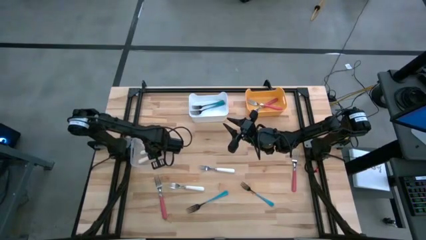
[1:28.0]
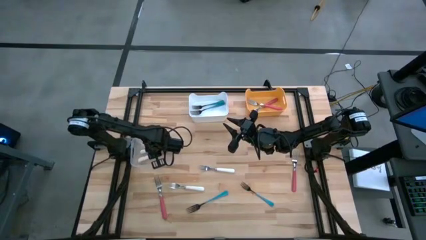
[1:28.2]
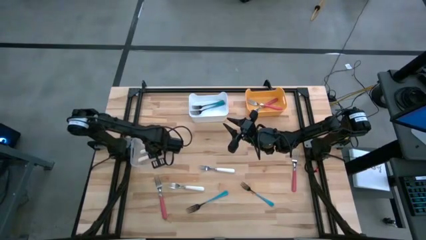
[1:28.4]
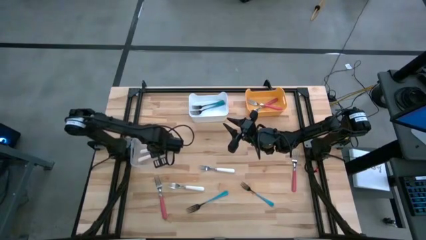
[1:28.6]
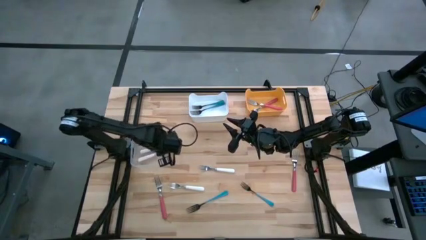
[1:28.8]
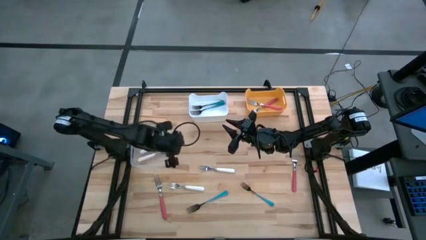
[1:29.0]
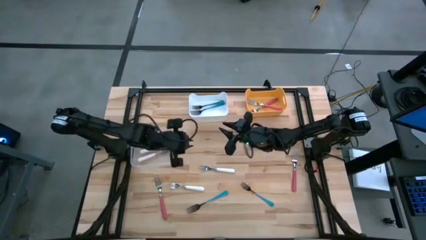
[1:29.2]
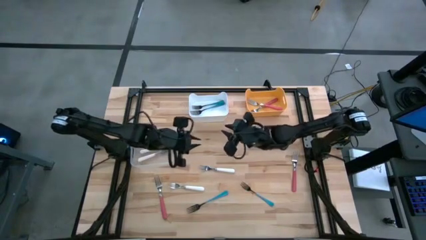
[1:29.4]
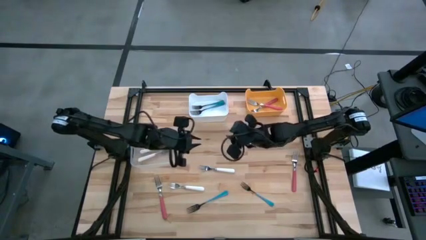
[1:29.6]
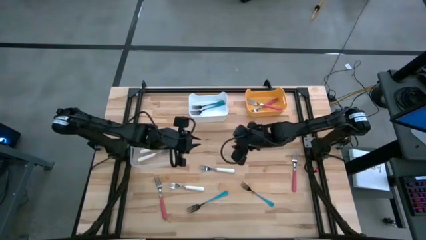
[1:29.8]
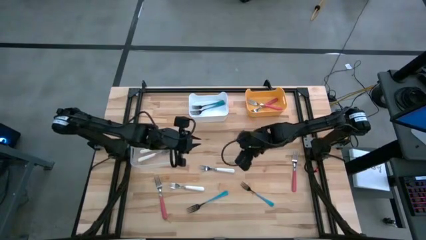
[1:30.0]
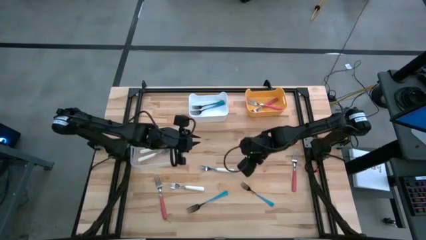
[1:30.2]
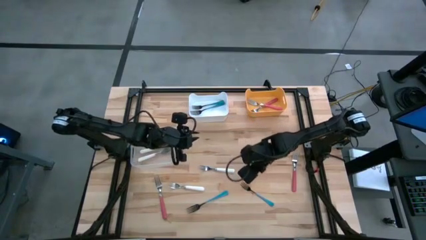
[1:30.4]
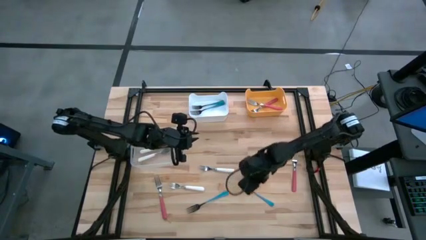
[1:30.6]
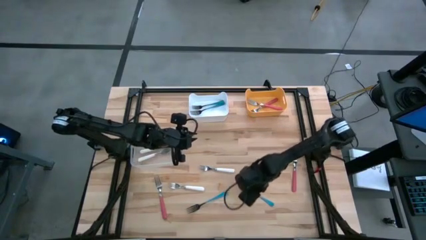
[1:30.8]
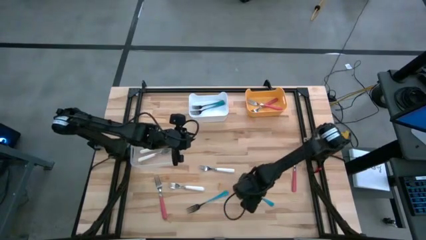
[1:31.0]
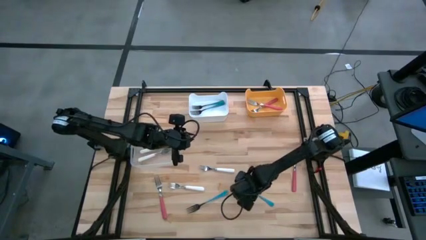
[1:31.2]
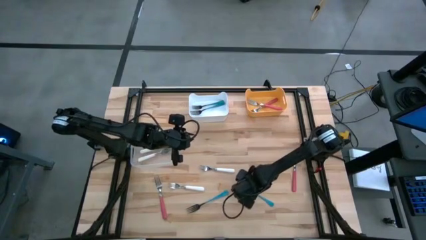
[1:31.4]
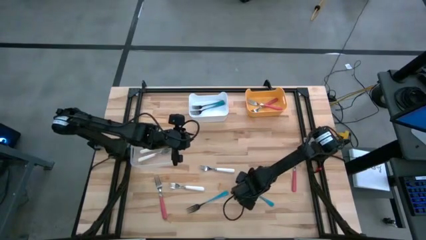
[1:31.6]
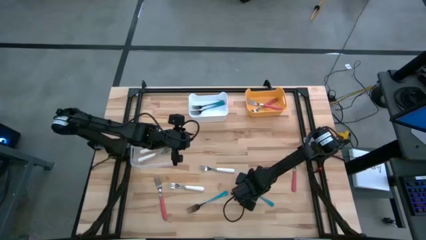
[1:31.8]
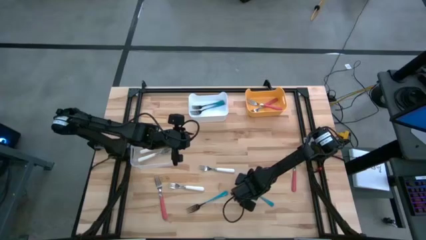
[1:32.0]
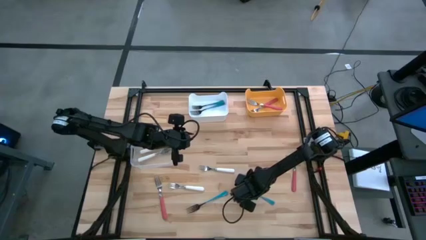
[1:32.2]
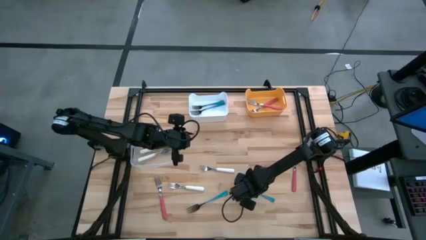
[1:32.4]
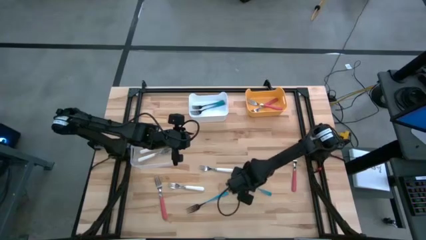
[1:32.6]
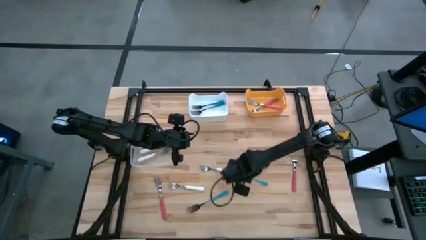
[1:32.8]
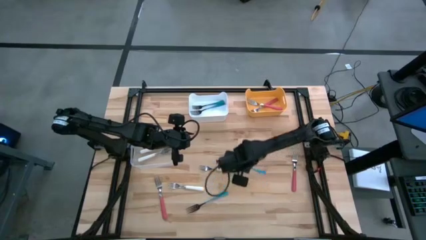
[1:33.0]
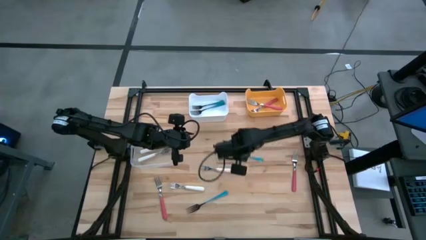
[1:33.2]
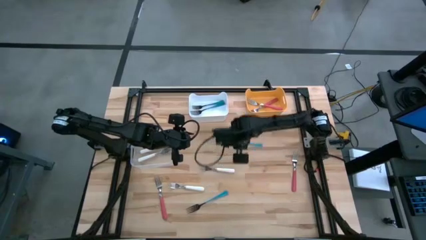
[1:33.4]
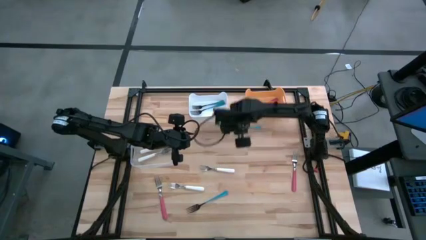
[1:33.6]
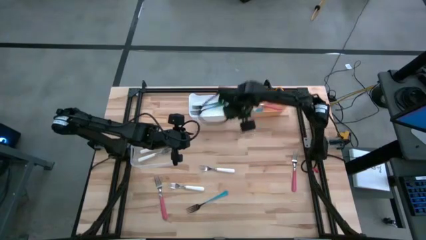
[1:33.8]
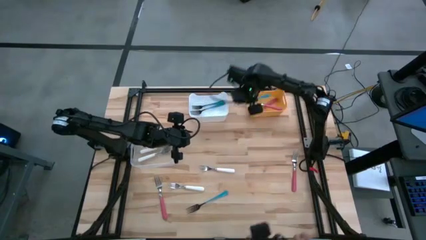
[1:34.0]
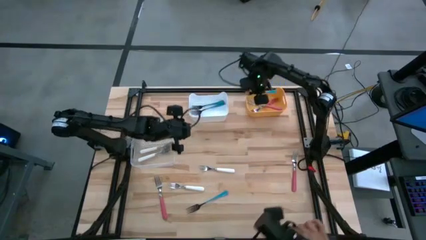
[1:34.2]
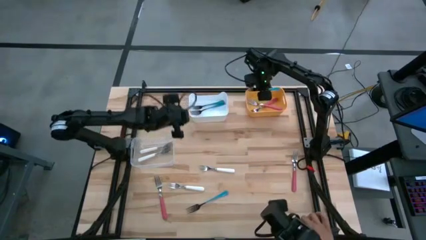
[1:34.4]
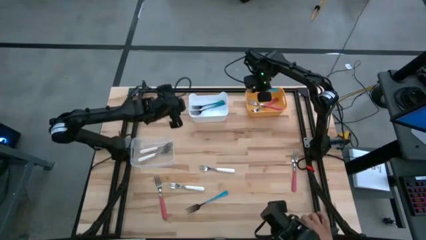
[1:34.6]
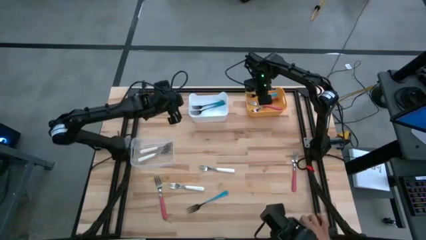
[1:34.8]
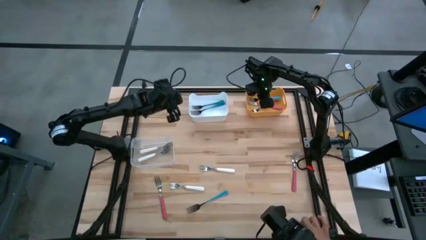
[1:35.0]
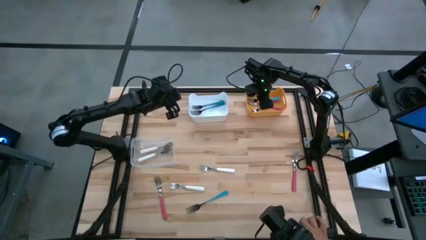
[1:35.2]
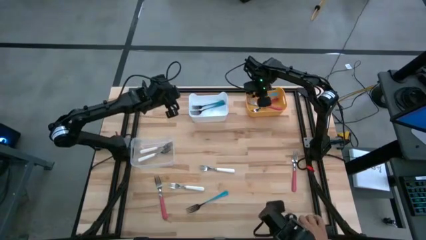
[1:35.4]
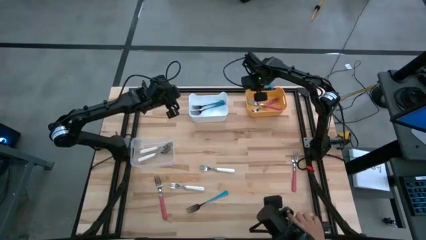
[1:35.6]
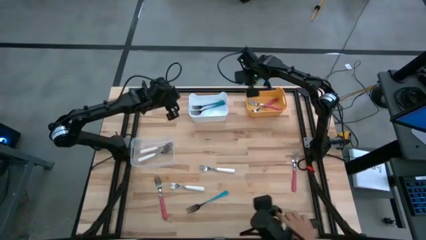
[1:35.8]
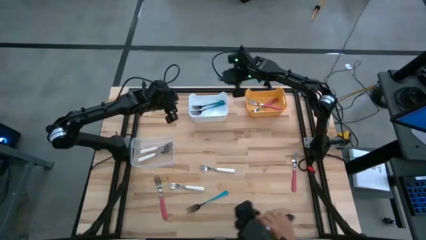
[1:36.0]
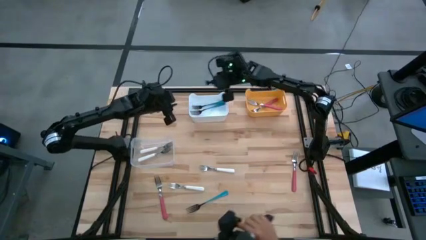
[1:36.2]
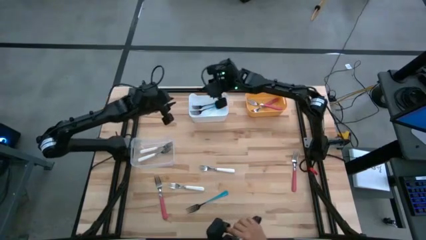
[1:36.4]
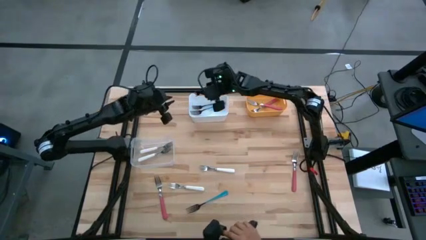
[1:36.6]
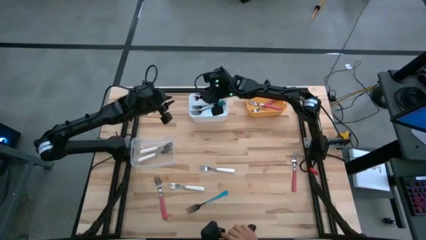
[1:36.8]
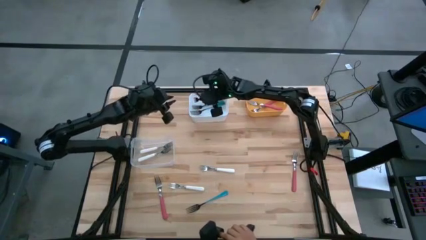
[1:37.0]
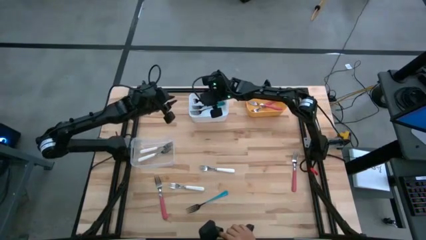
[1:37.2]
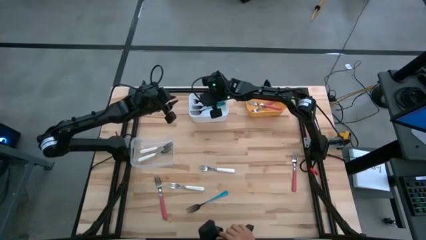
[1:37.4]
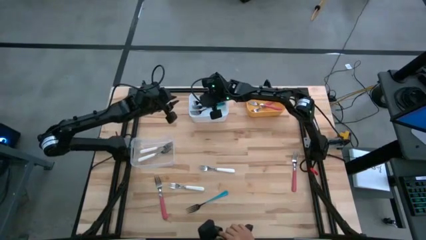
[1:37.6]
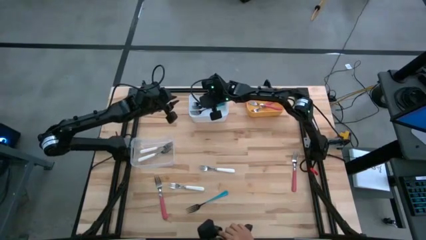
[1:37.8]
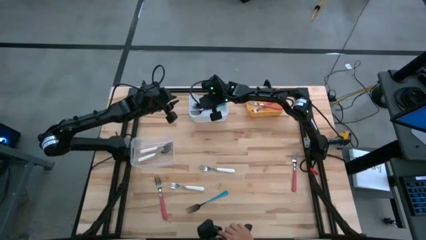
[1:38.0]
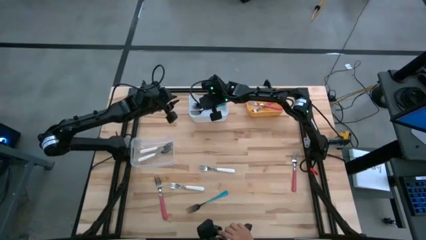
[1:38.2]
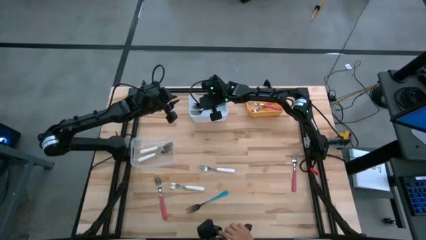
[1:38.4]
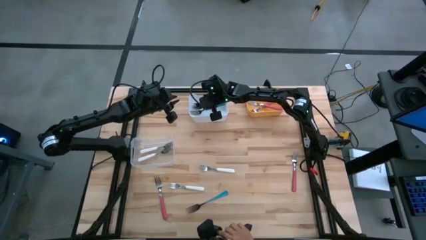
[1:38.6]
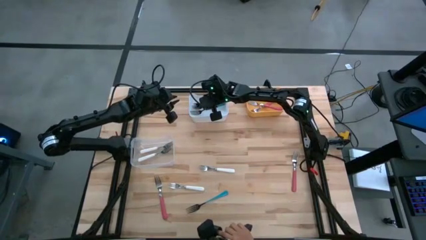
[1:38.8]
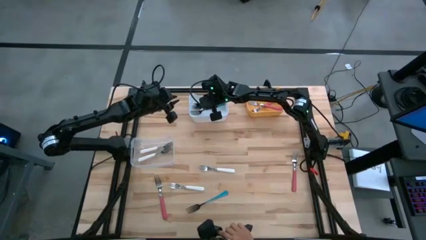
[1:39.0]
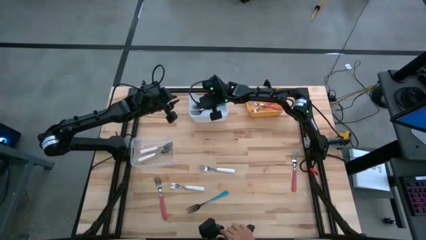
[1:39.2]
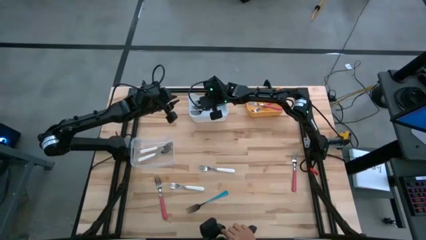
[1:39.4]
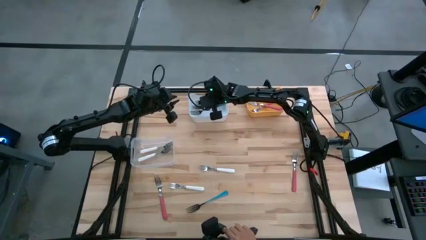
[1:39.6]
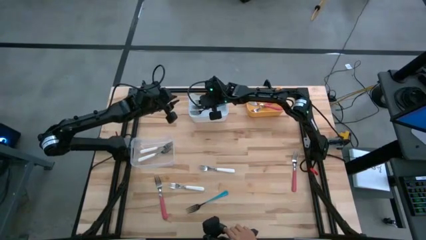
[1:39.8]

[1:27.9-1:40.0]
Task: Sort silverware by color (type)
Put the right blue fork into the white bin

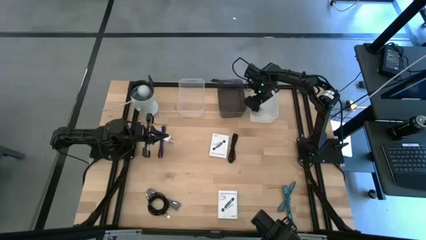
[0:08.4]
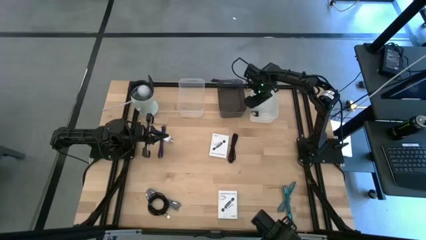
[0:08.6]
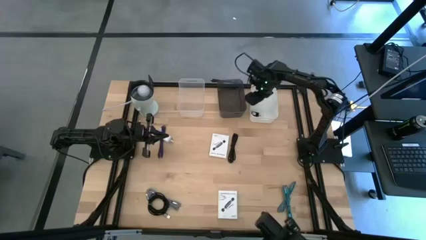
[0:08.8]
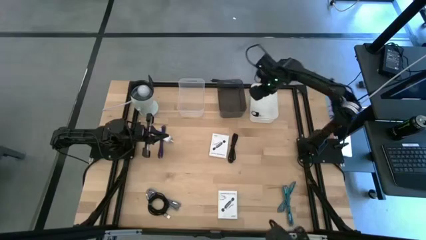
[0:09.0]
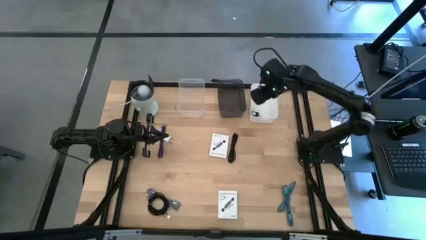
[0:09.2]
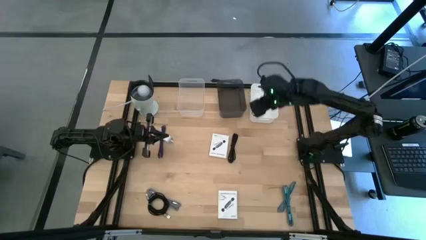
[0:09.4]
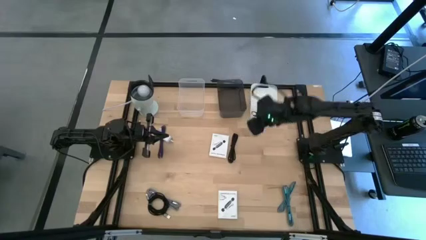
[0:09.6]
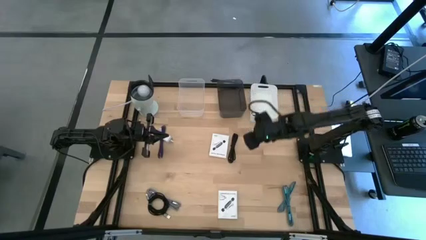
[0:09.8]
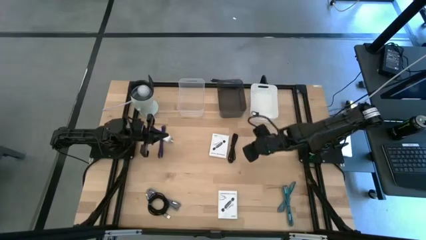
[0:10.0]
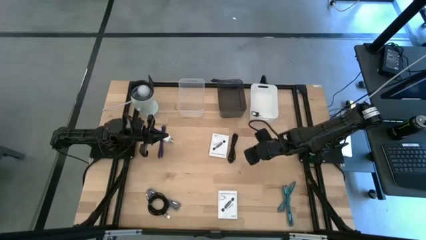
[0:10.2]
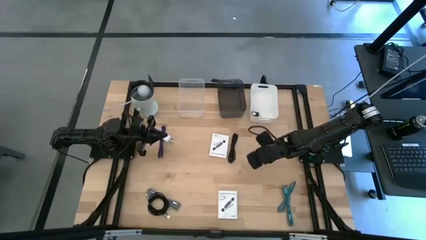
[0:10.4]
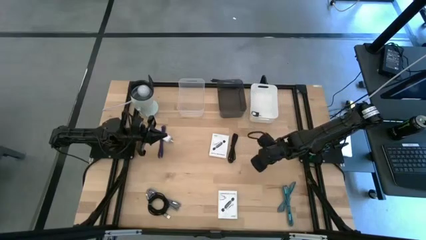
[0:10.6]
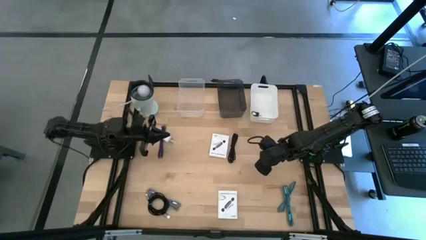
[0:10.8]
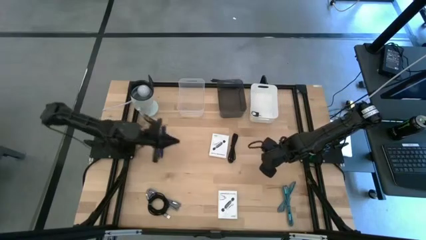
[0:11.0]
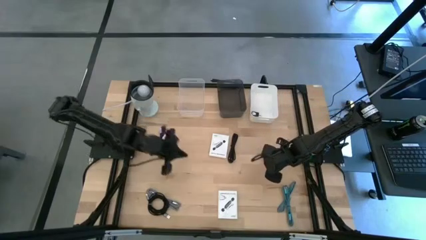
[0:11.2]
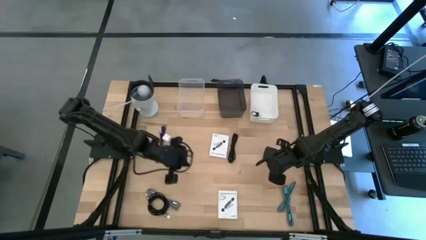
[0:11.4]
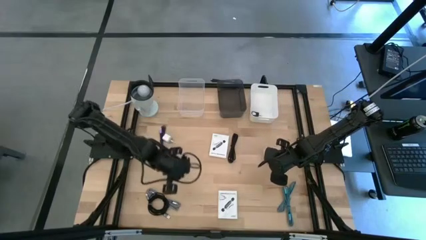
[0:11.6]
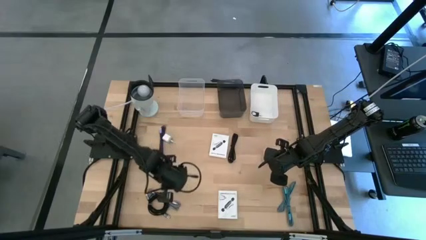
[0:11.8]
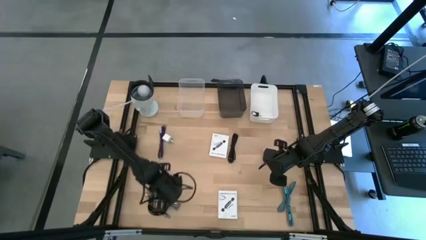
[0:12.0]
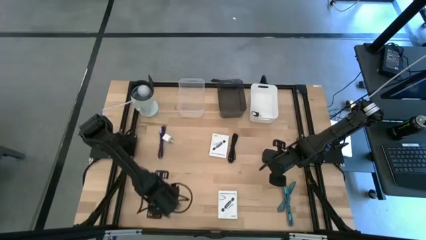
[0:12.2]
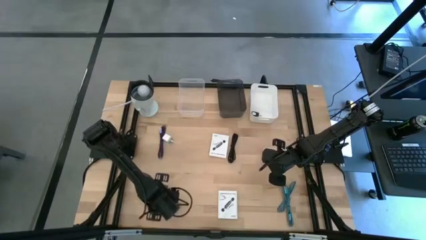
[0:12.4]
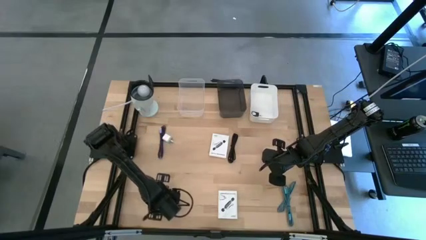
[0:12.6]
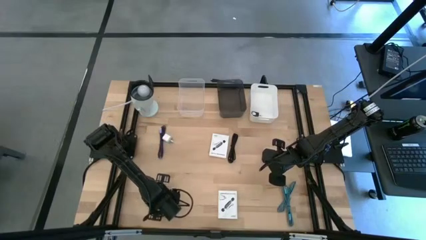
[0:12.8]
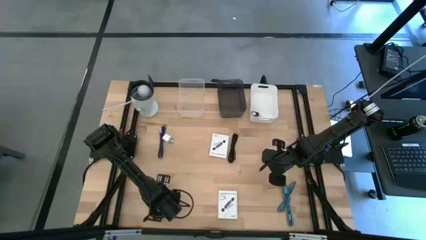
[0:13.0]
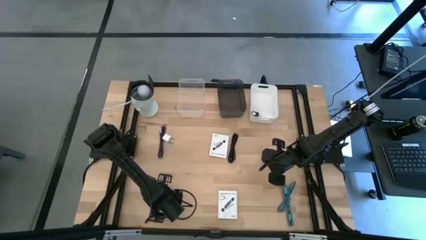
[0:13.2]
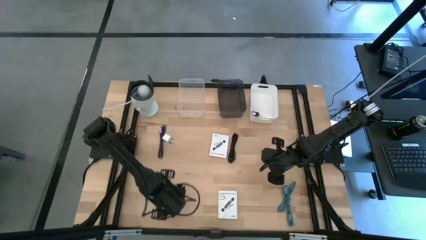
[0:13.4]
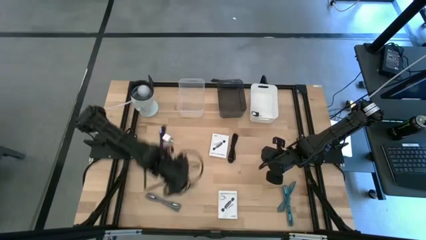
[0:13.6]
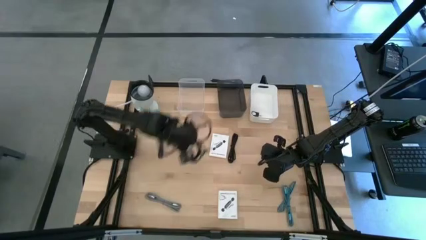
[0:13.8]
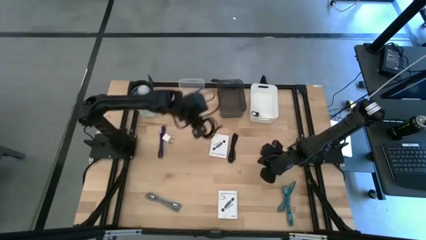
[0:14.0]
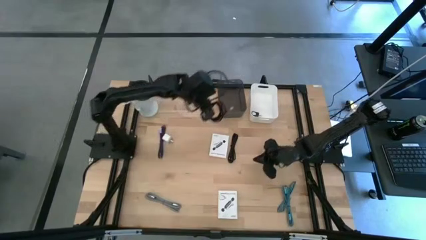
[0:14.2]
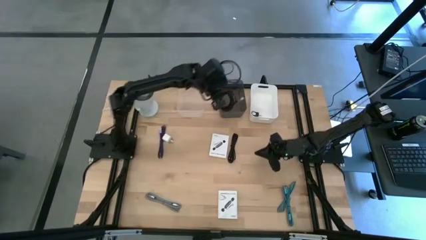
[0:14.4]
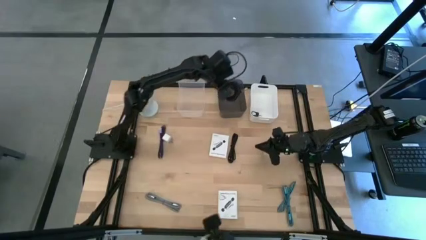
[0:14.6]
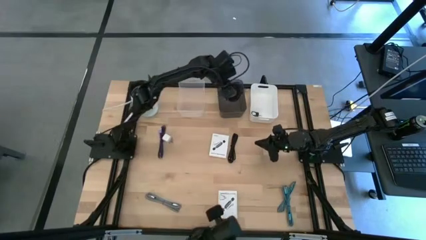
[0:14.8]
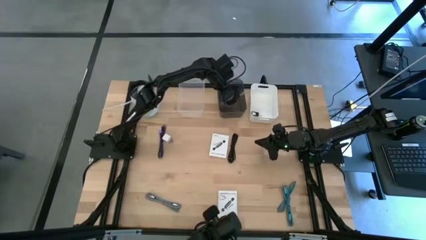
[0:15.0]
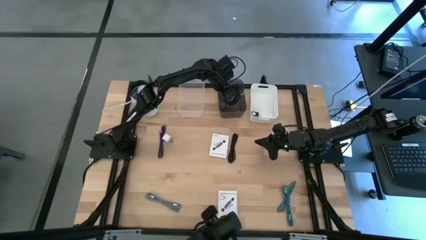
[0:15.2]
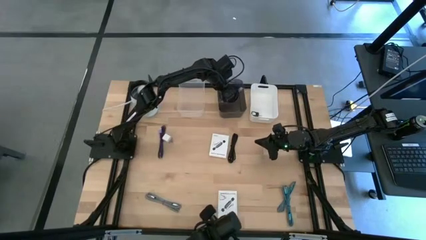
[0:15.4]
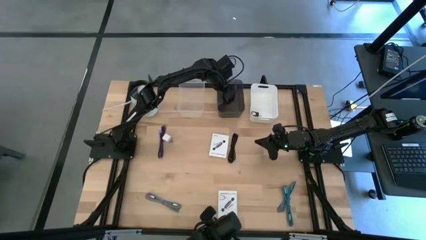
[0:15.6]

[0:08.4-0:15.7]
Task: Pick and place items into bin
Put the bottom black charger cable into the black bin
